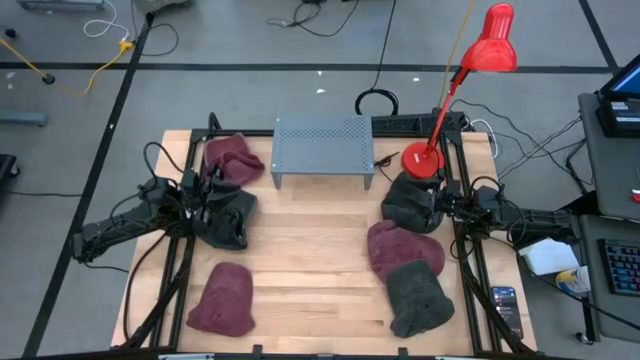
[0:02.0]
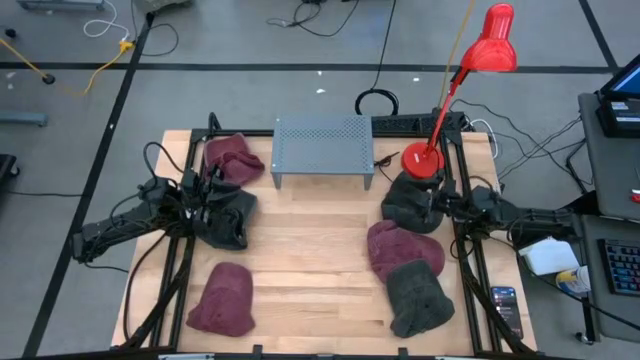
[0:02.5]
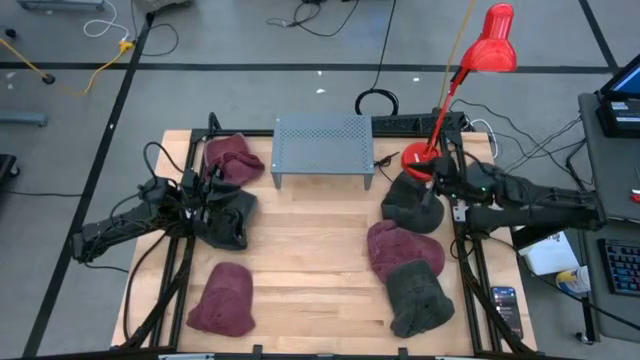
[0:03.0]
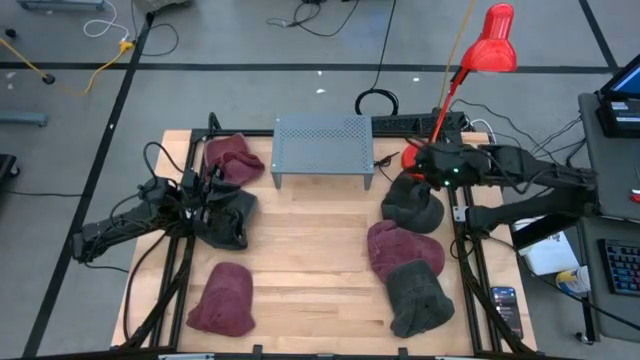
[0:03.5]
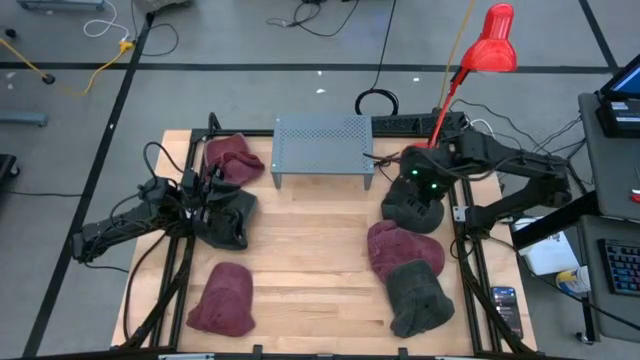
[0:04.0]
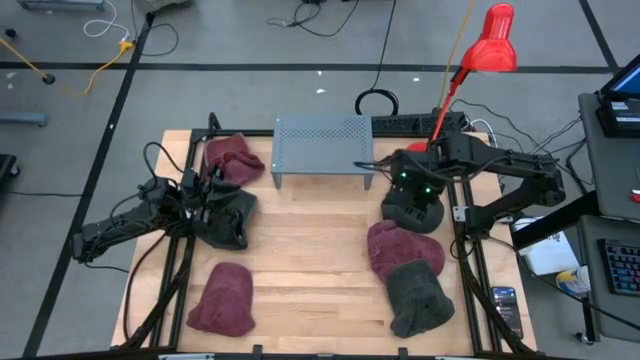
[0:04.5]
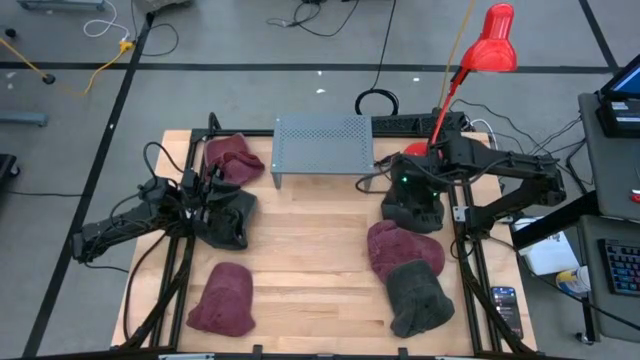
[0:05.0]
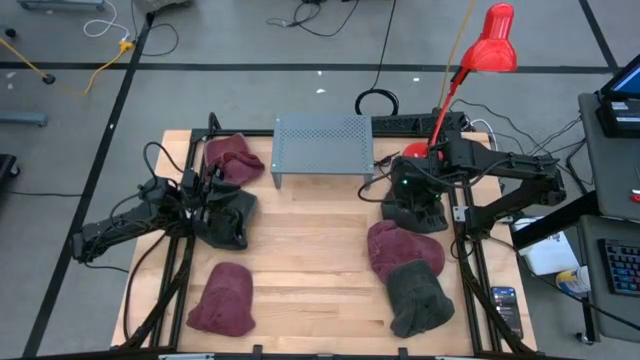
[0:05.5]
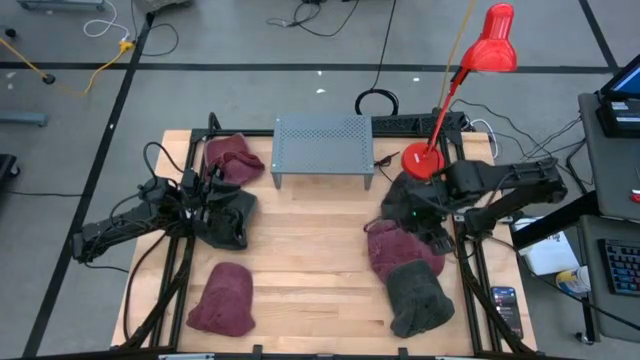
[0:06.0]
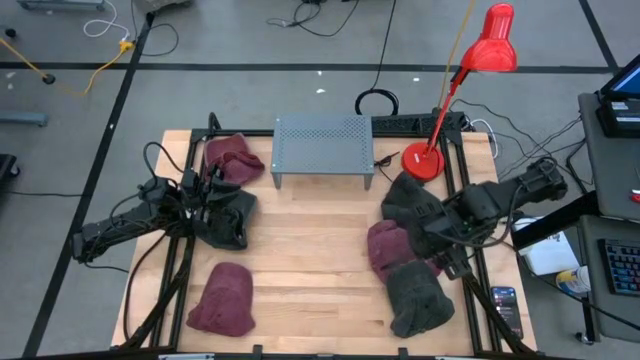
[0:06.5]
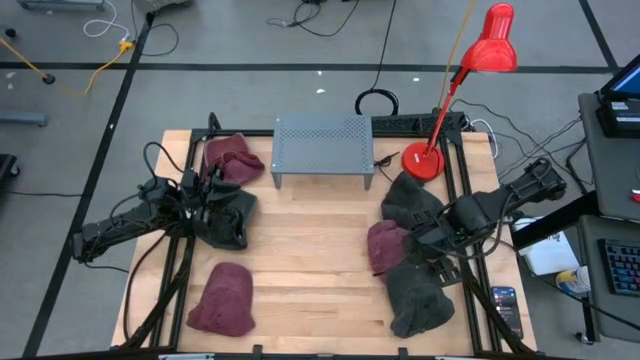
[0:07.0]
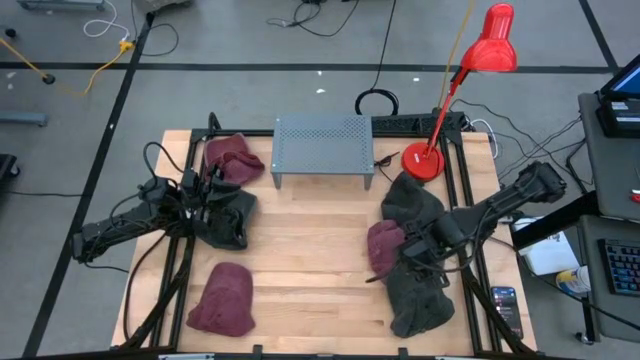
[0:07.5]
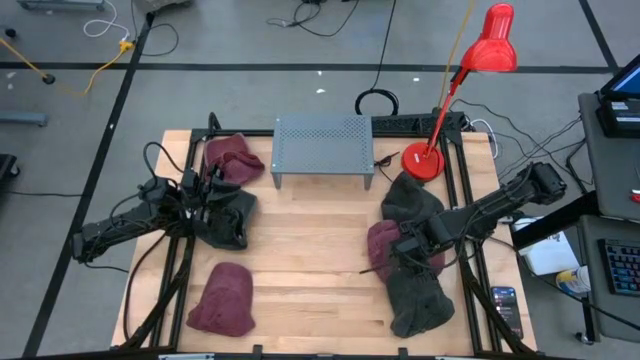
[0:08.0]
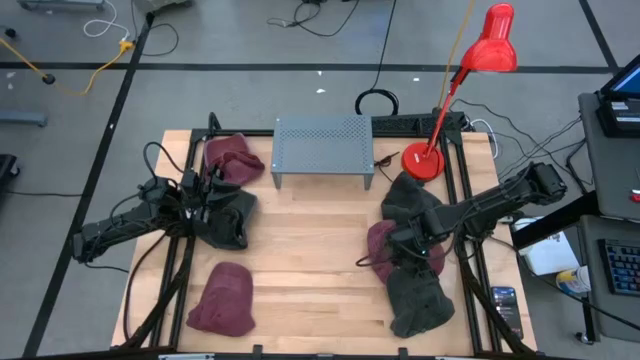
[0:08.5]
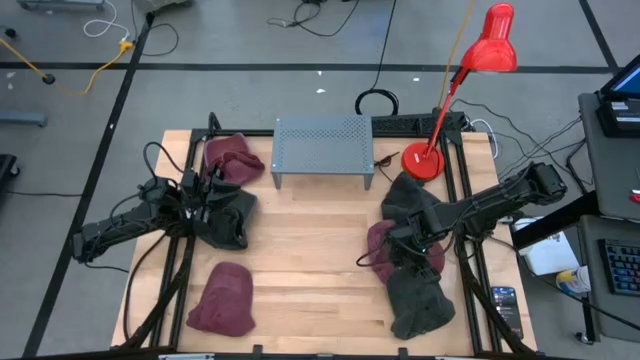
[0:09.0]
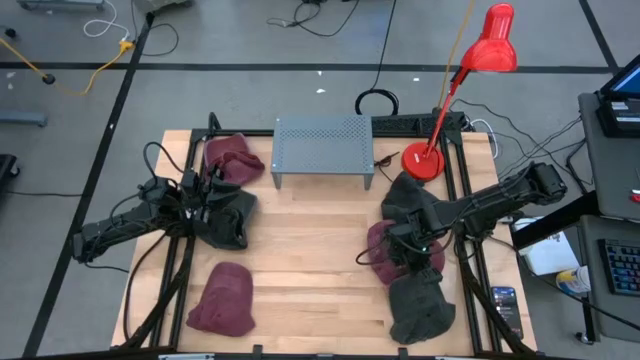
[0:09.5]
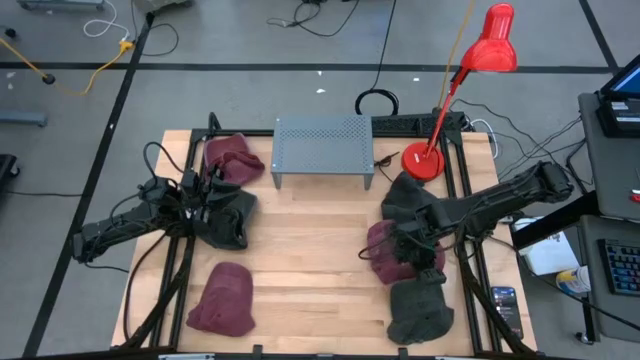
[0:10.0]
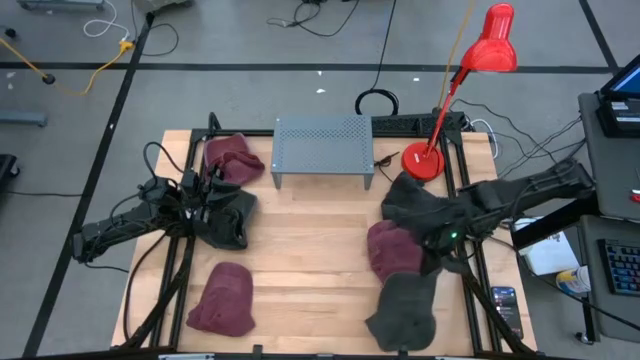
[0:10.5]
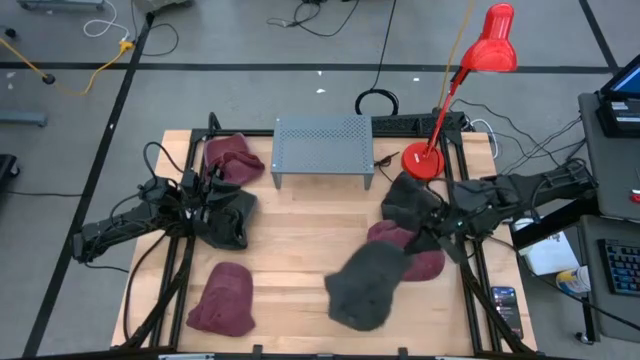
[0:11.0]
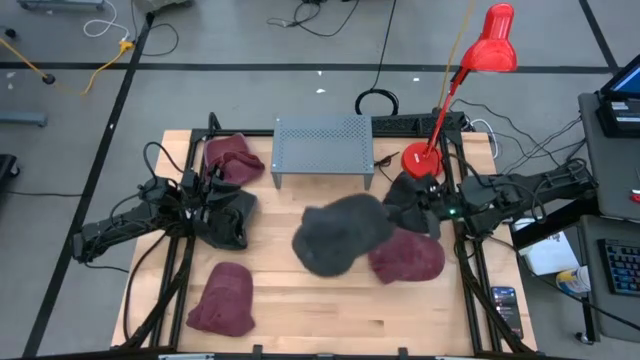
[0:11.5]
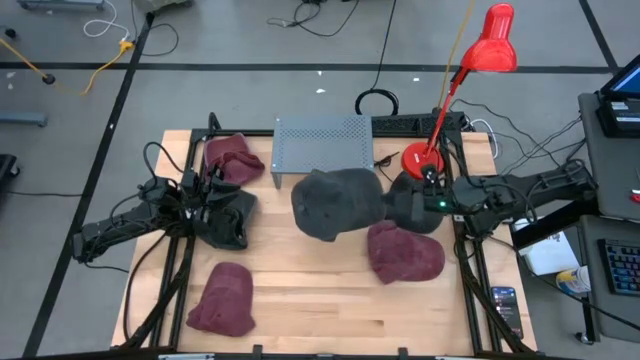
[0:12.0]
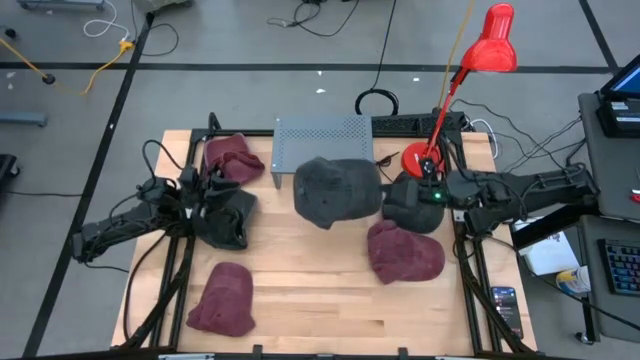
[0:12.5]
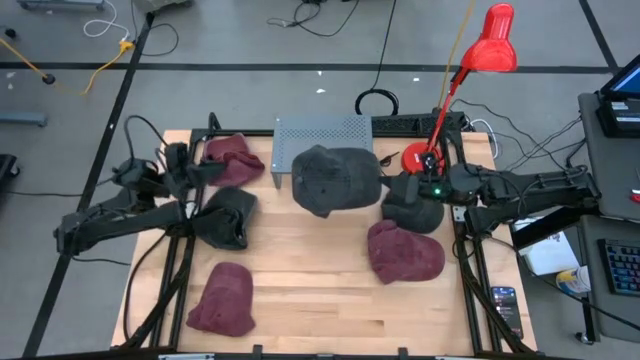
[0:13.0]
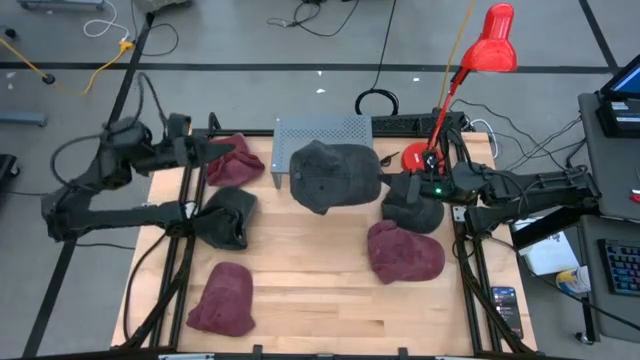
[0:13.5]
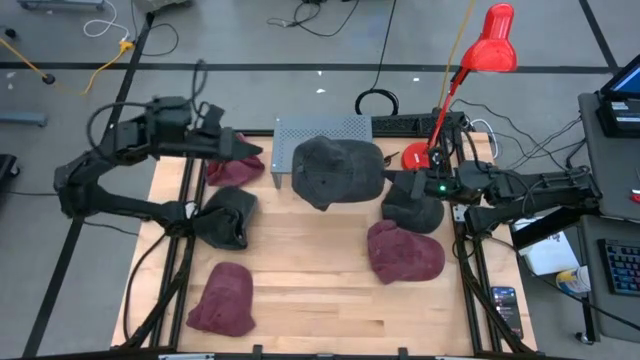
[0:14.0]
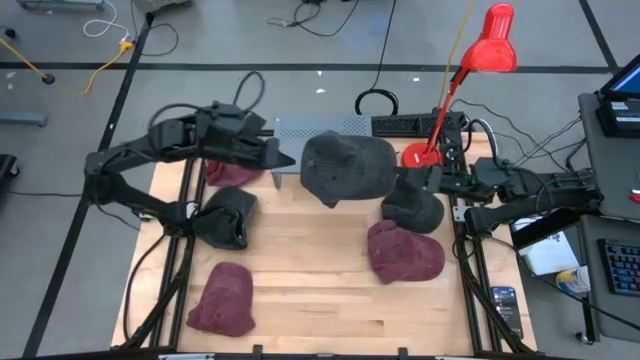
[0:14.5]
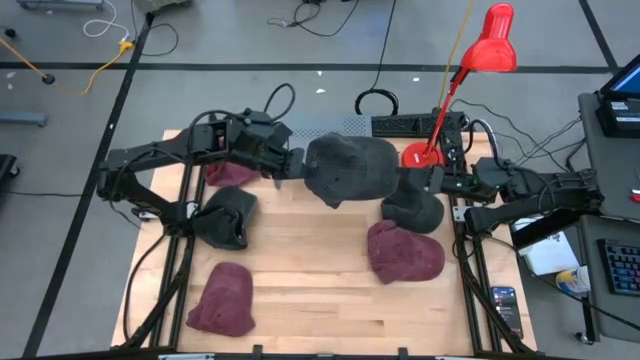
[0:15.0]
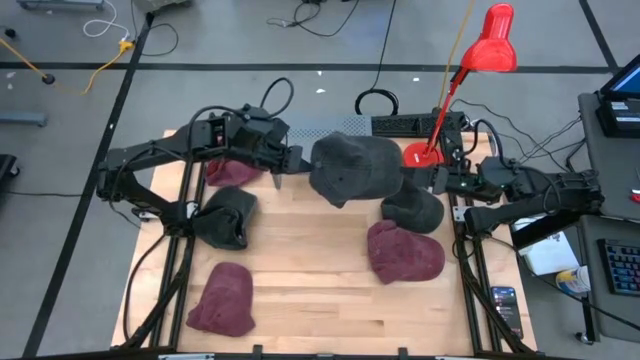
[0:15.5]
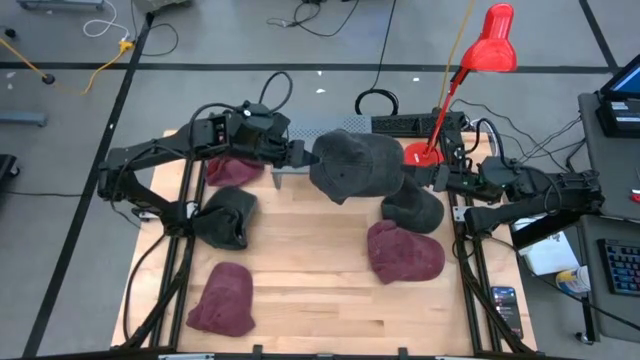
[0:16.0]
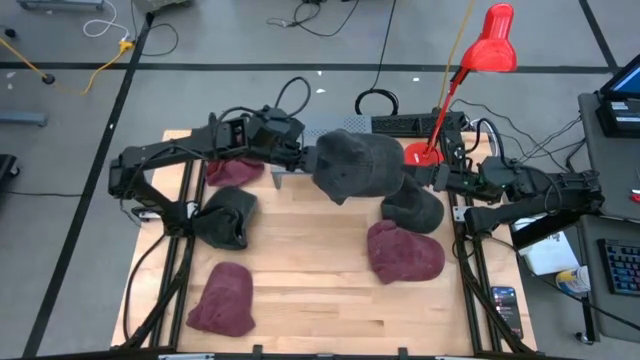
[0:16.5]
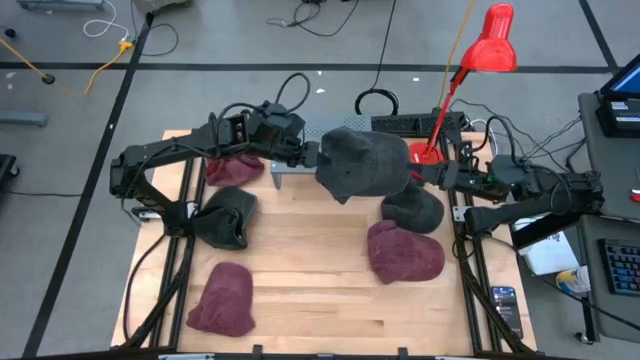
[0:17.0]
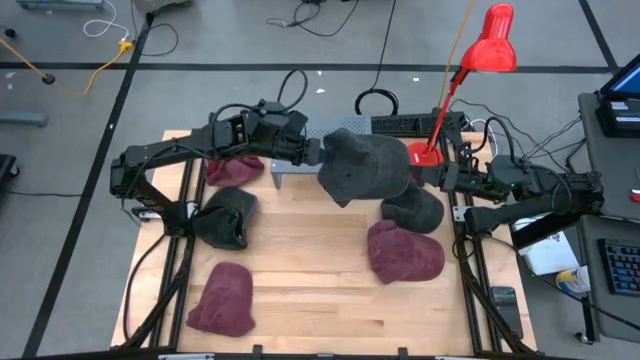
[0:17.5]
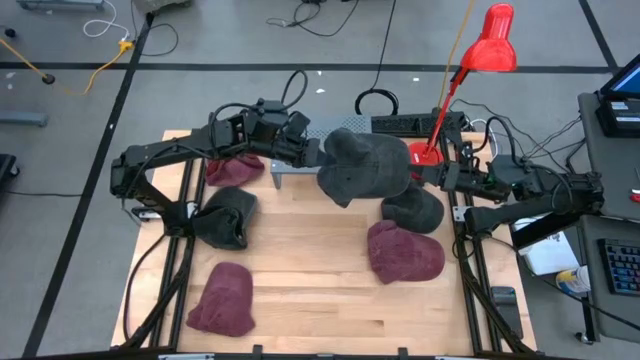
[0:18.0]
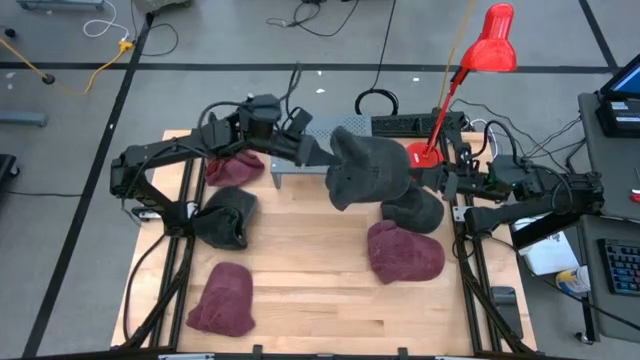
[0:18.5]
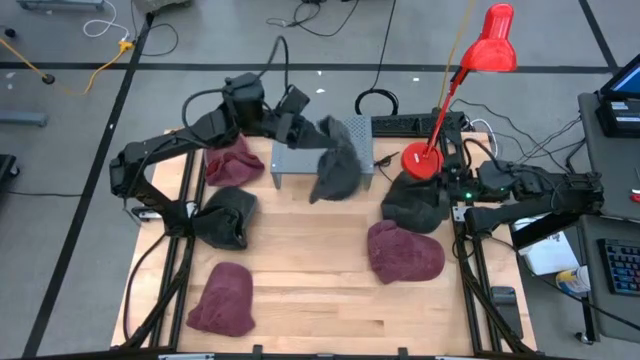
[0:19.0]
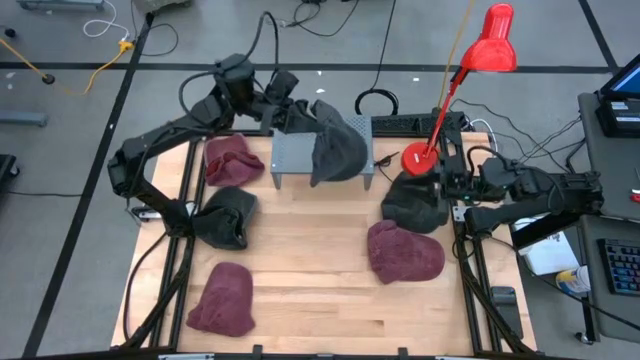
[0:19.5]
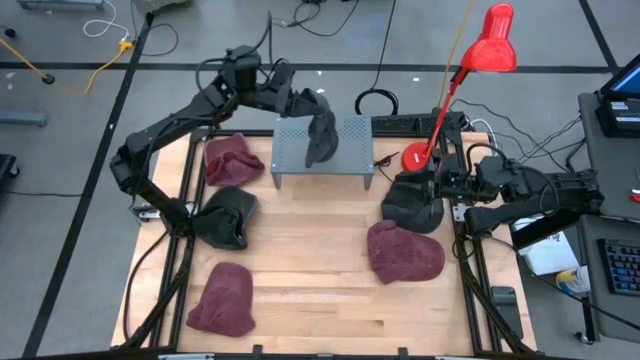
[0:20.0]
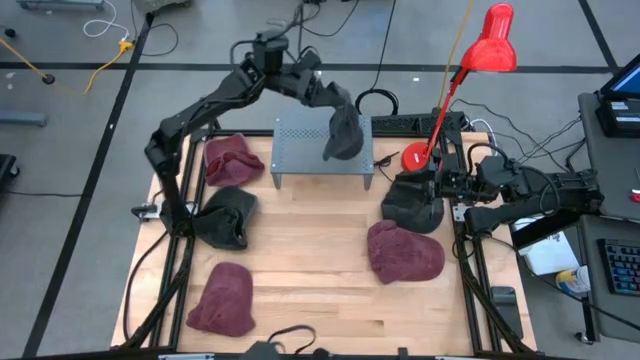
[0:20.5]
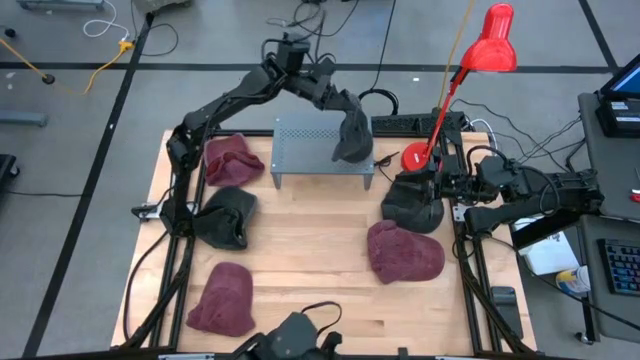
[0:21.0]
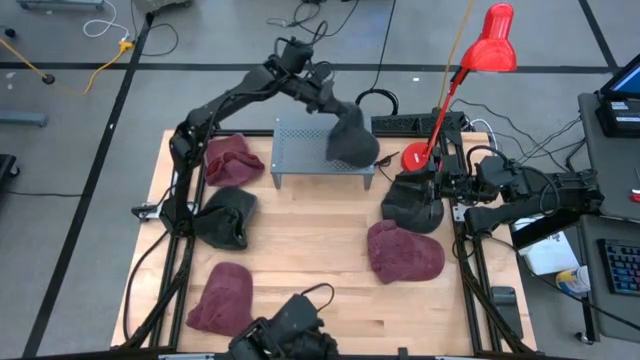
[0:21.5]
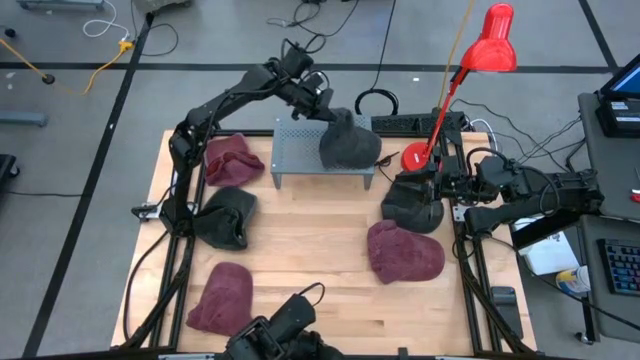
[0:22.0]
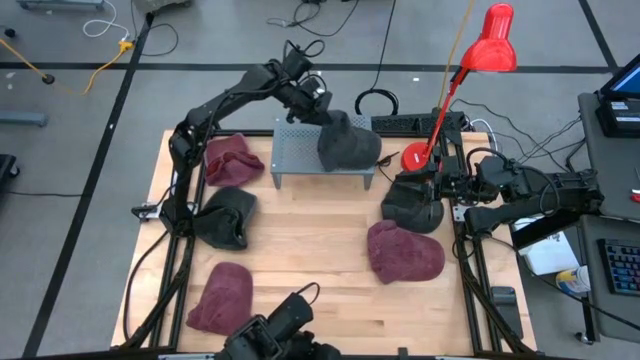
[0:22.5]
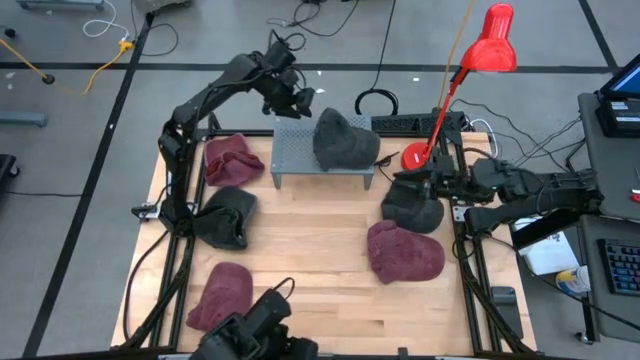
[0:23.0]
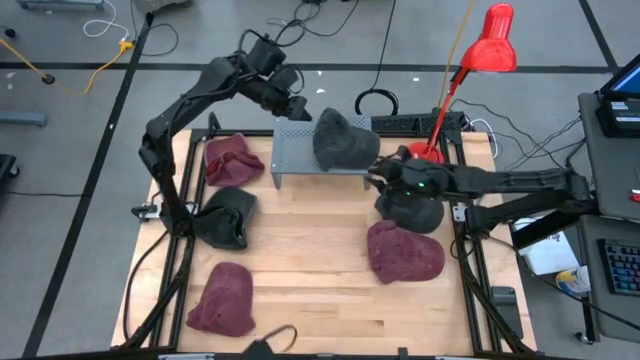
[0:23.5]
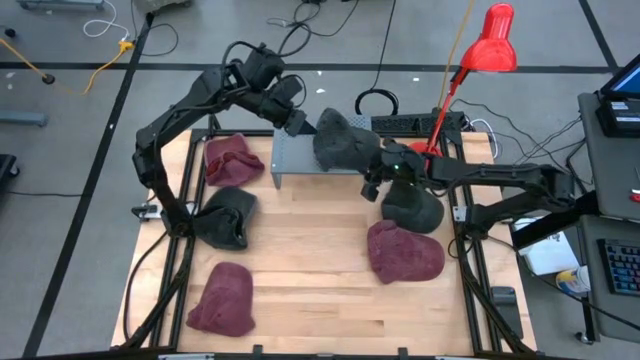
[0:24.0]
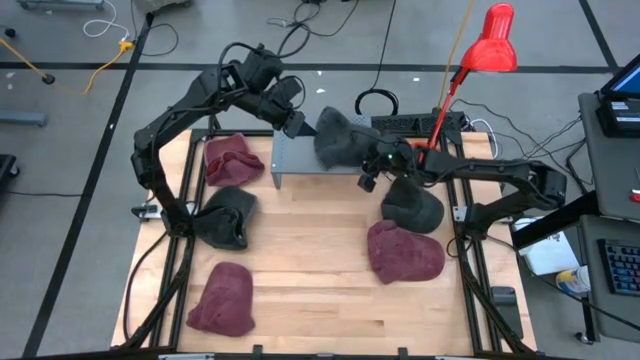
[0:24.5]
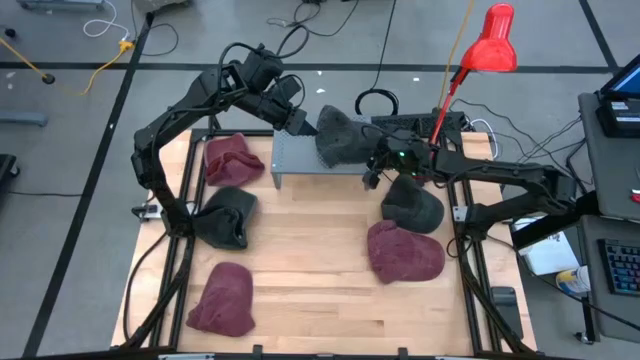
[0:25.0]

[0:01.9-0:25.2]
Task: Pick & Place hat
Put the bottom right black cap on the shelf
